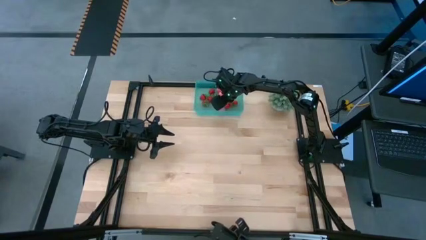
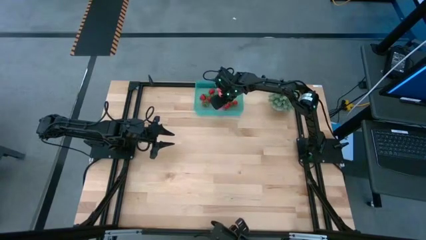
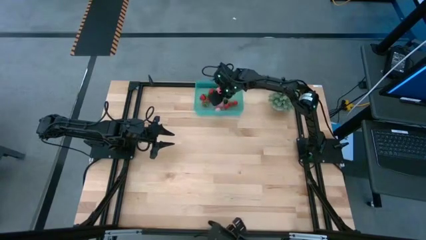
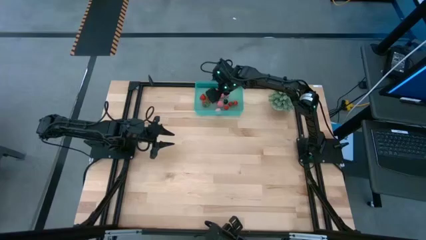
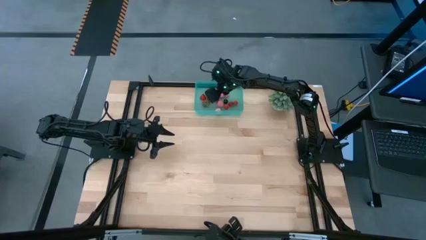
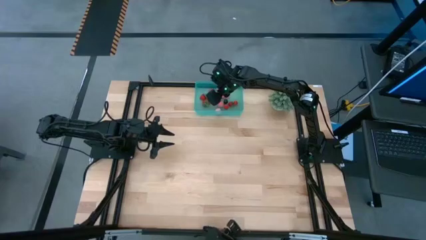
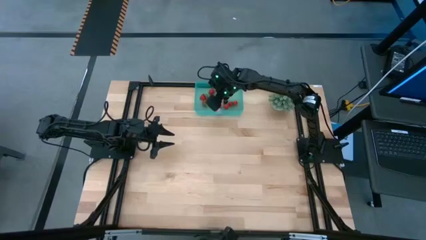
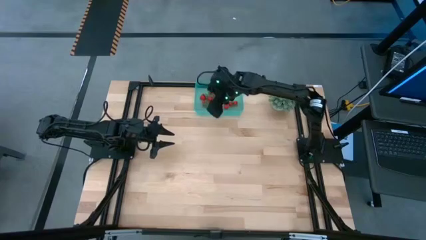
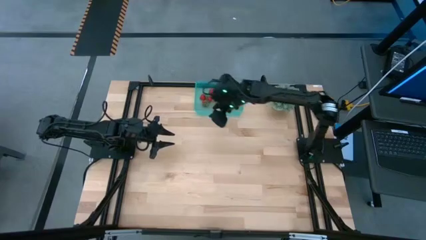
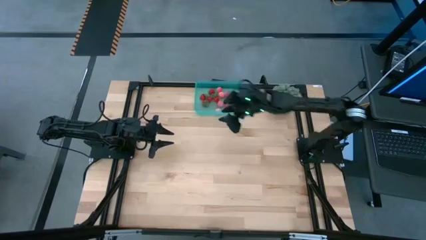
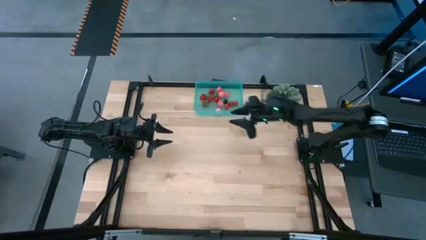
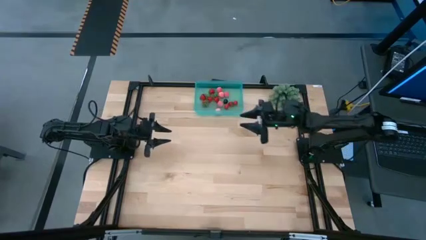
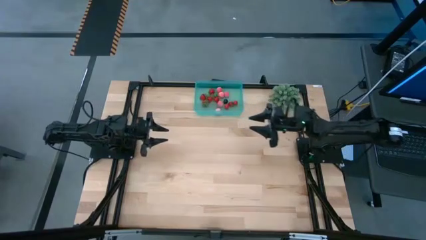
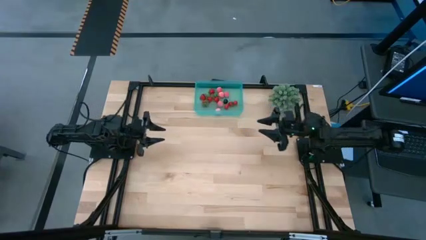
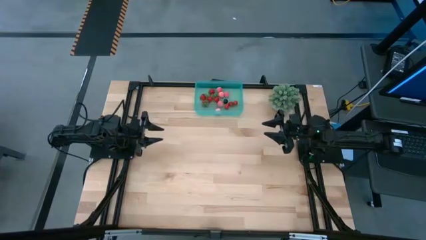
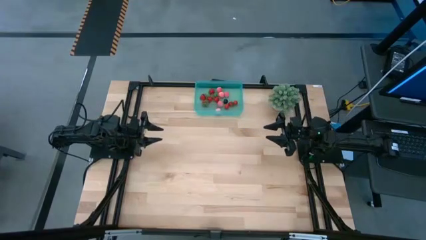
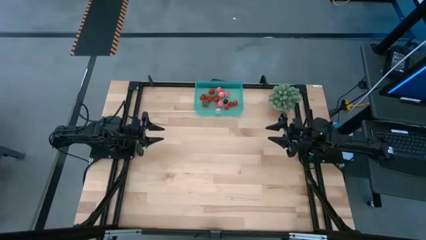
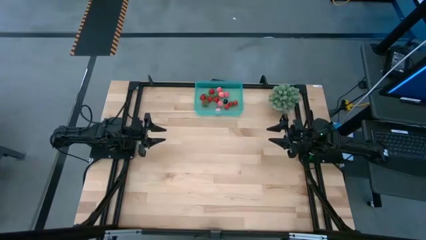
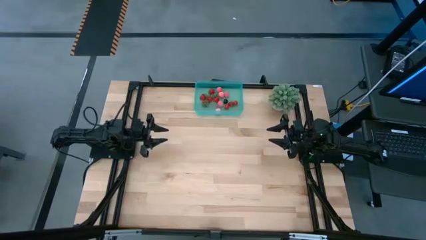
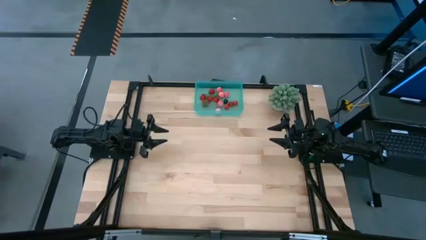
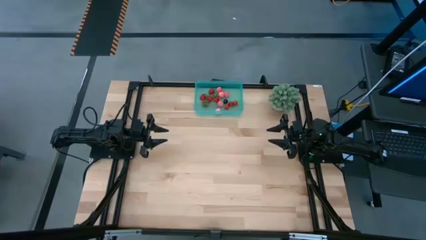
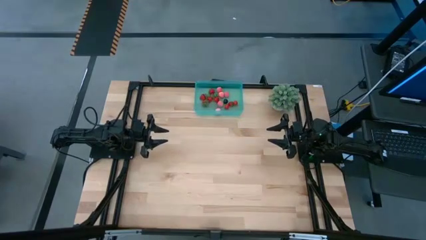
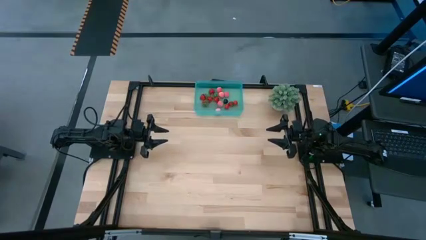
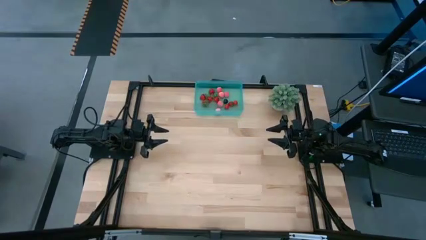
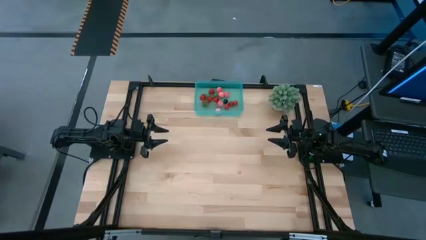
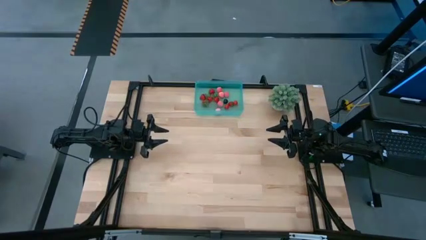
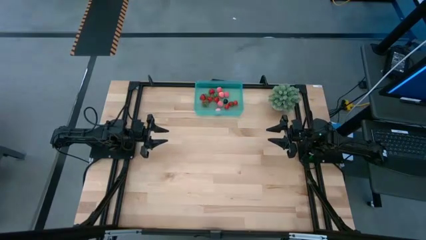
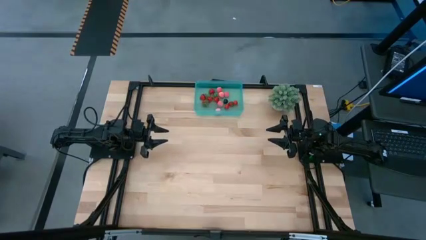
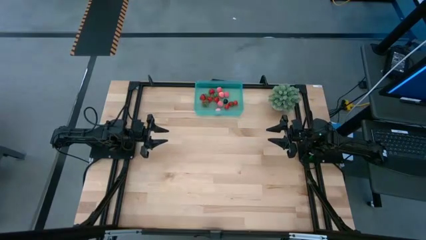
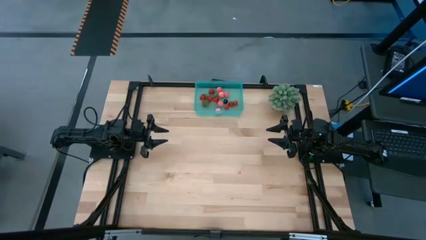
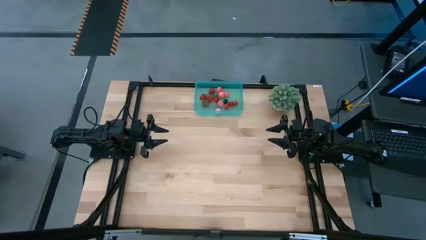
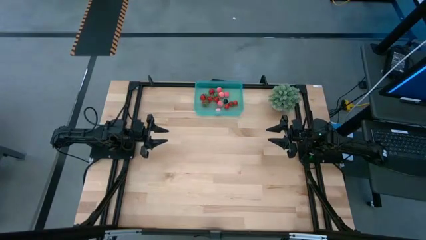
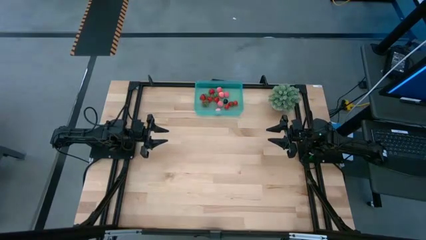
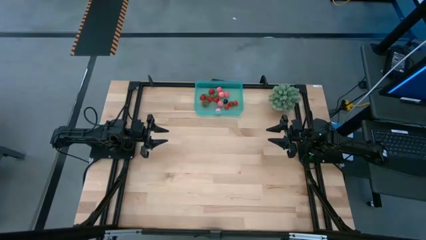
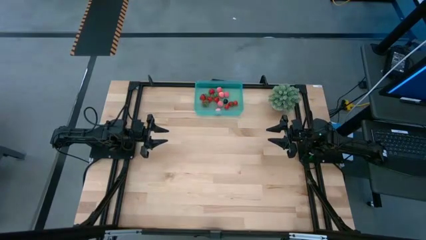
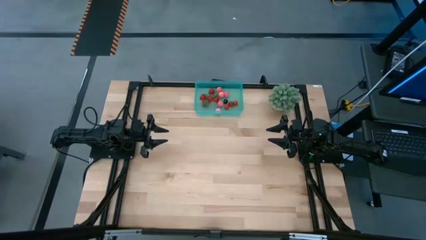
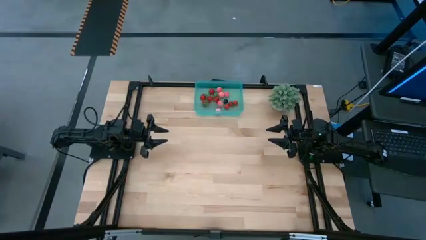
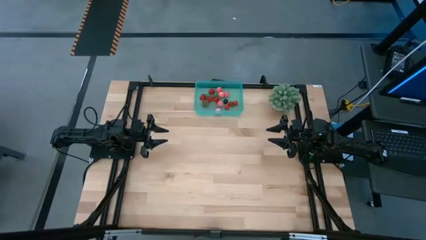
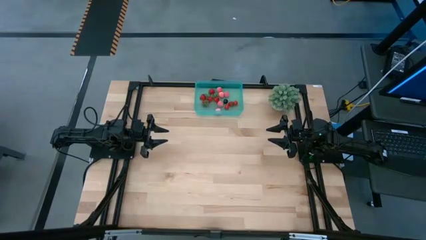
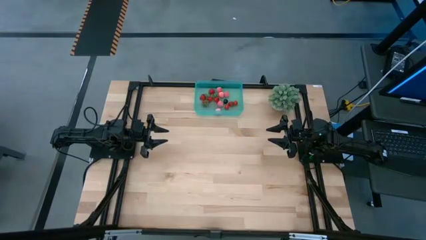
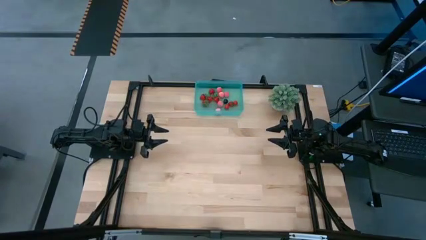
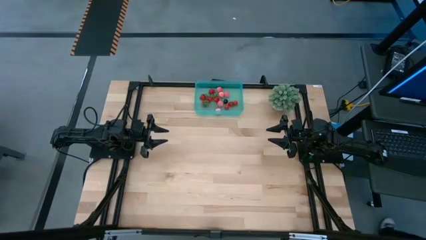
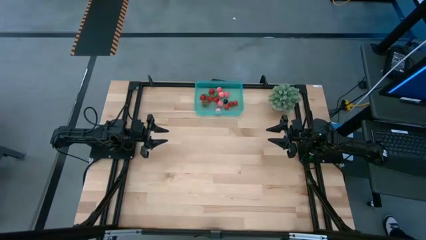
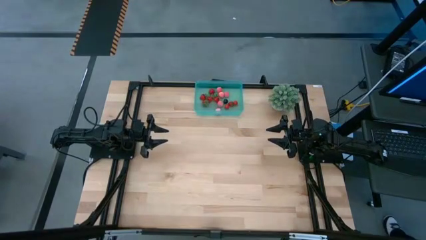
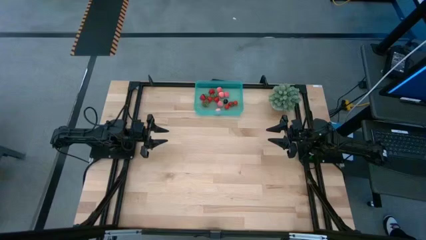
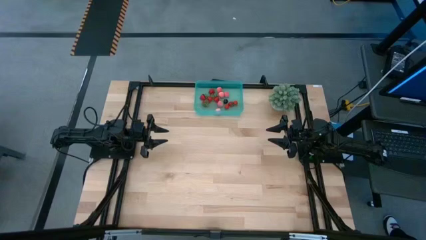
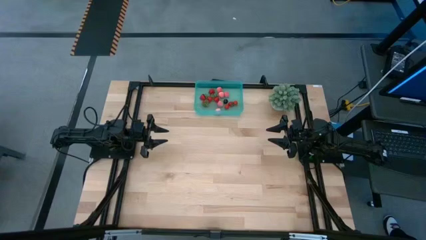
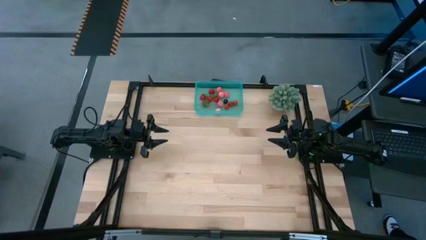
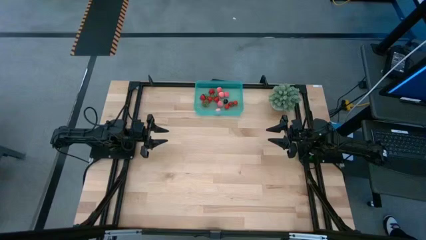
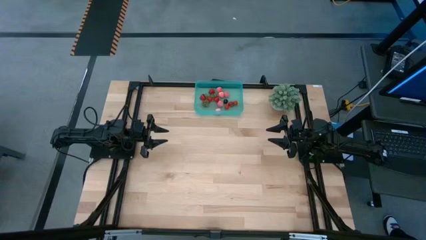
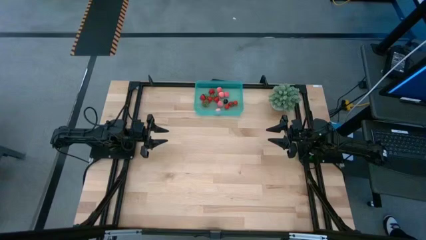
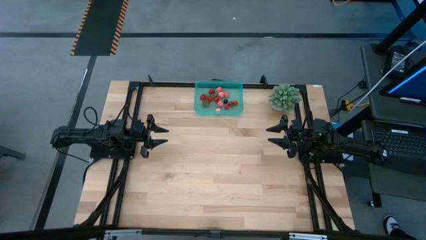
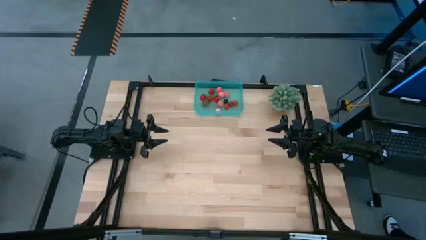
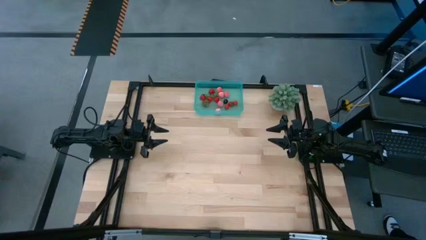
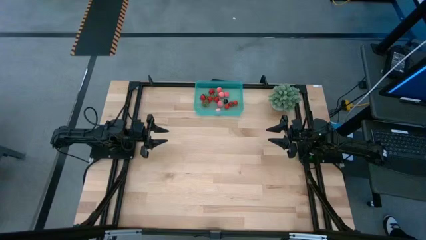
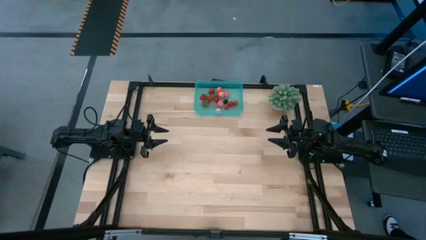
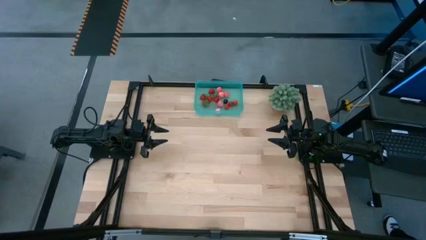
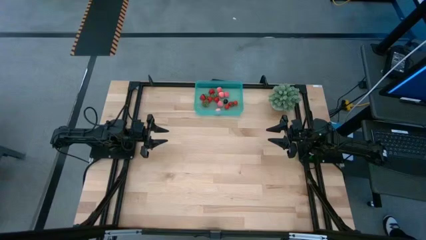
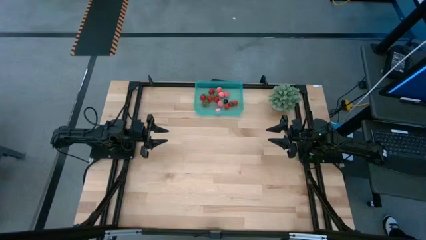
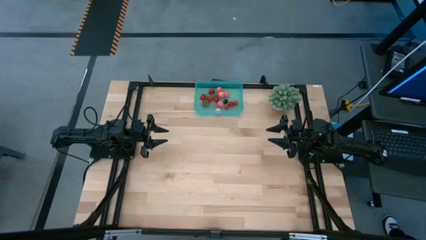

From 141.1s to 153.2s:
Task: Pick and placing Produce into tupperware
Return to Home Position
